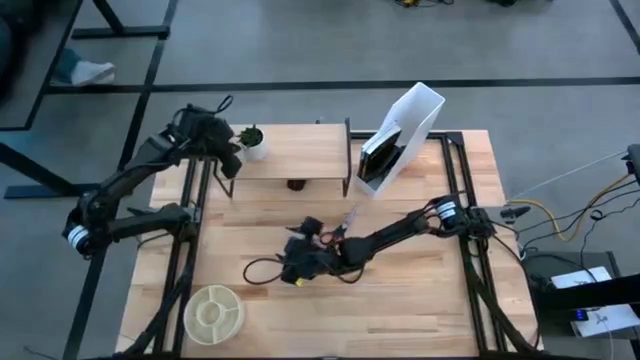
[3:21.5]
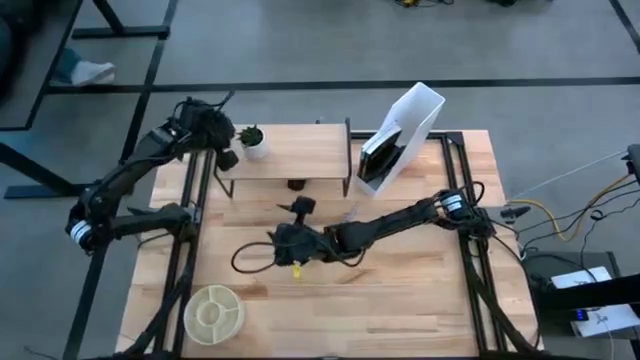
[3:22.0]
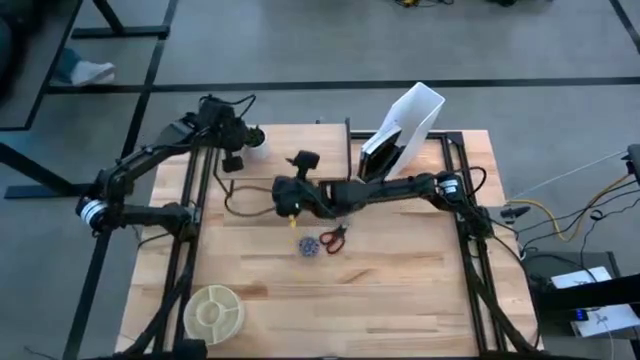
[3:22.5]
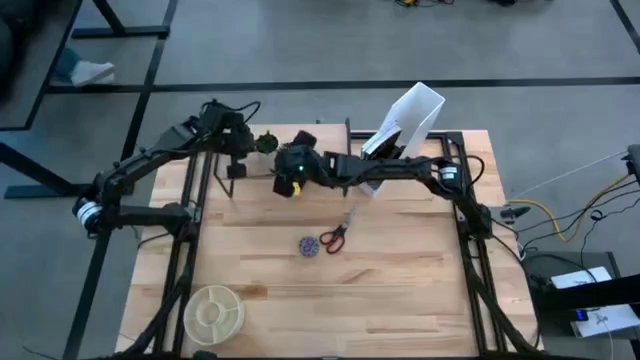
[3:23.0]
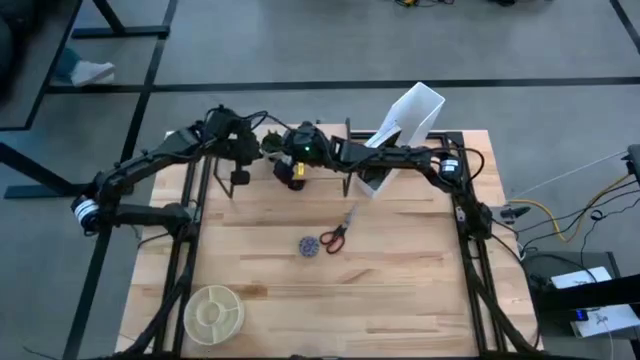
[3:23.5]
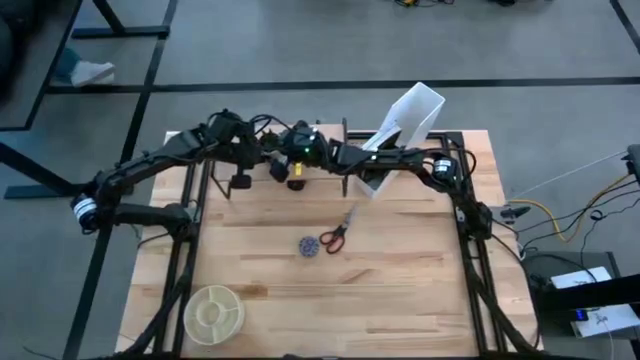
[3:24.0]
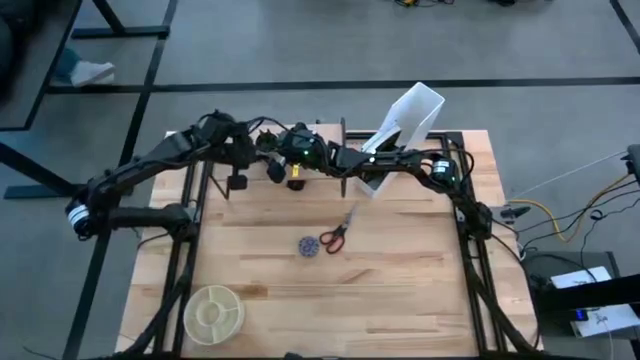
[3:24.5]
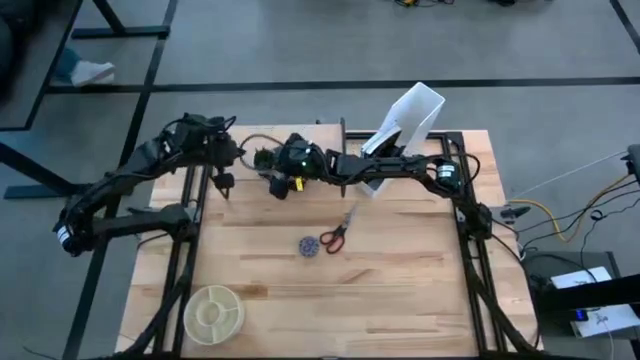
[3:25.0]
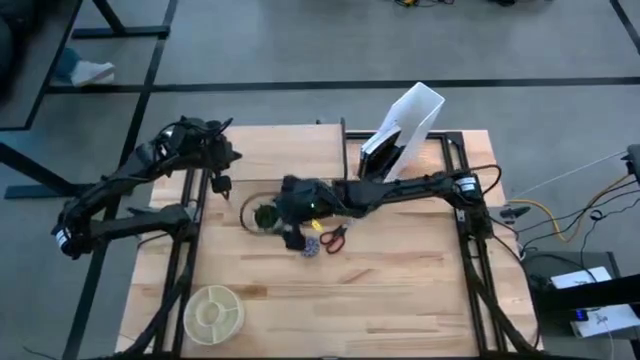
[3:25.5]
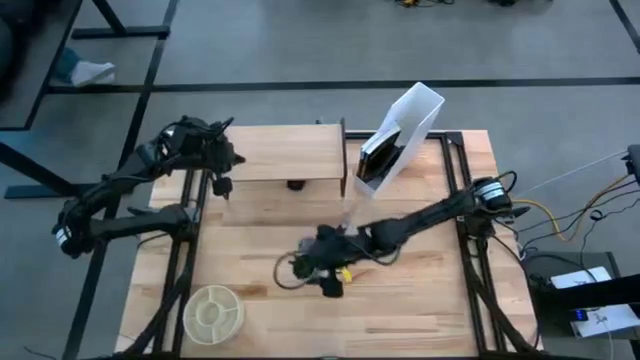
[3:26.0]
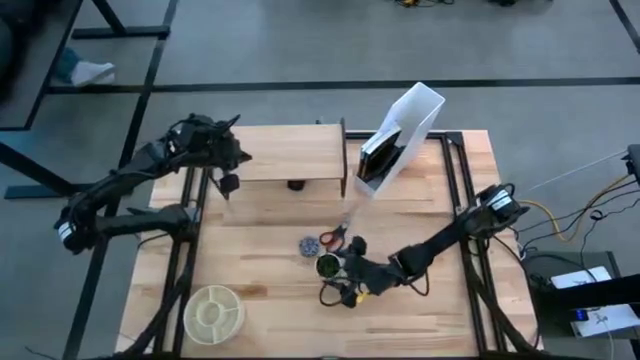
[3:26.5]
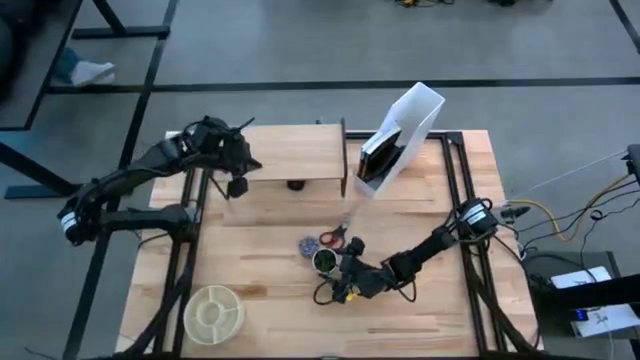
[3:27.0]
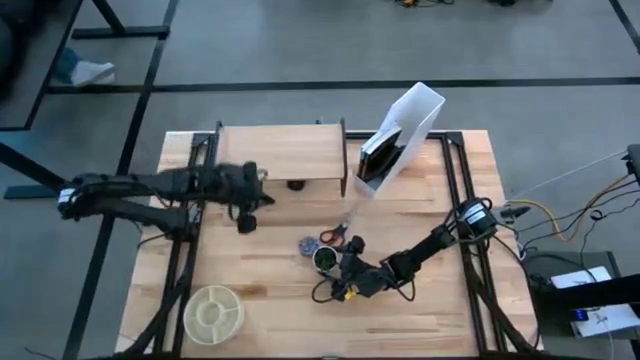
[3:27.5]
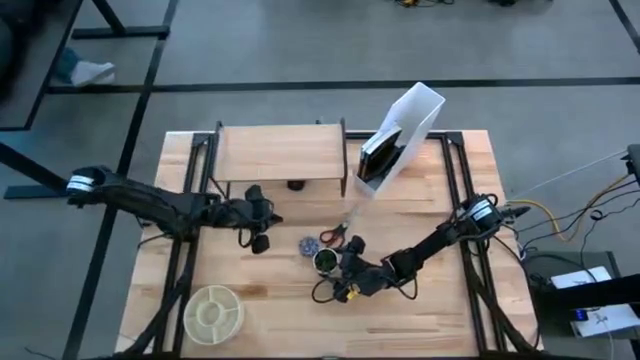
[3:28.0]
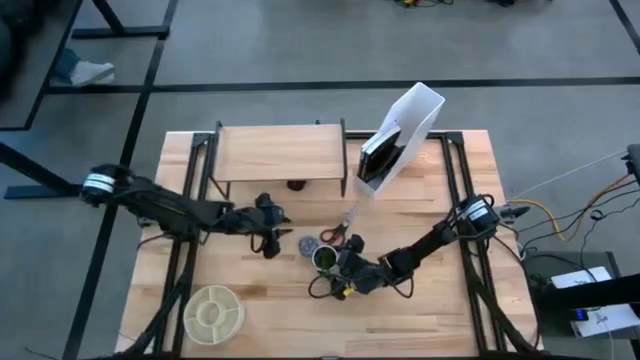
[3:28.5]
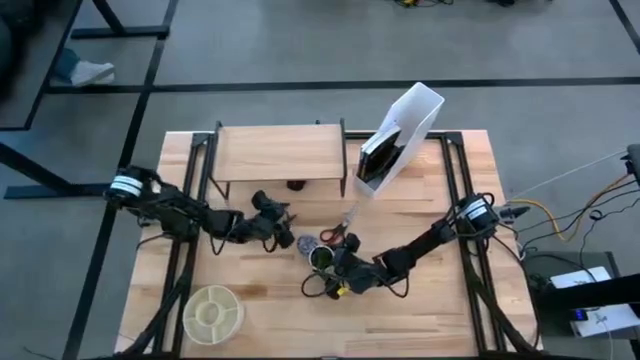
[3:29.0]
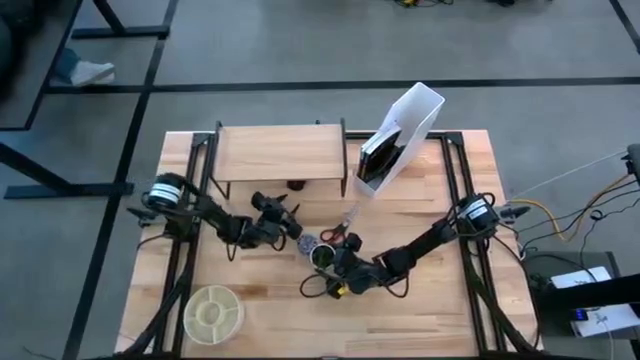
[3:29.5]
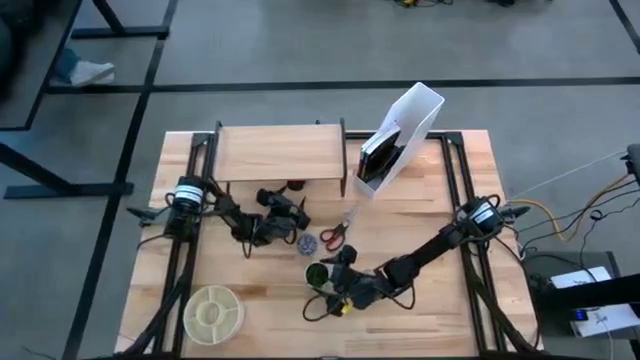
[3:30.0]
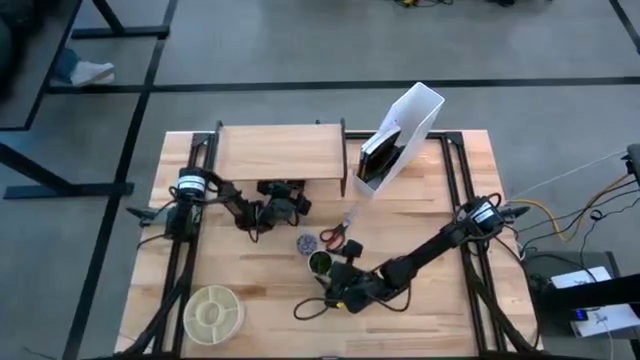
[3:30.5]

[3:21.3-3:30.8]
Task: Stock shelves
Remove the flower pot from the shelf

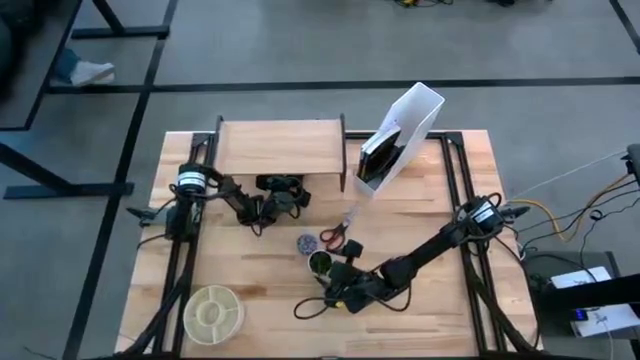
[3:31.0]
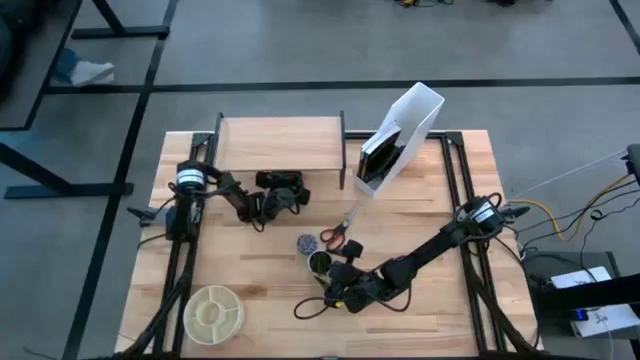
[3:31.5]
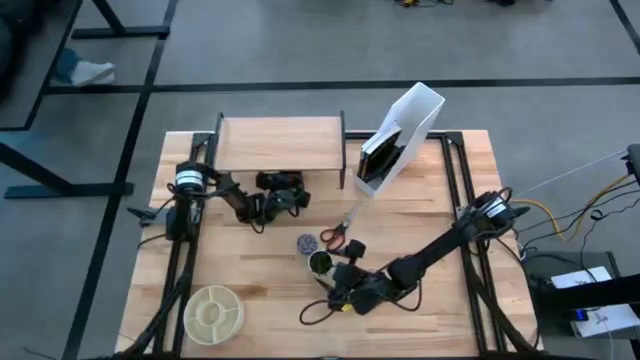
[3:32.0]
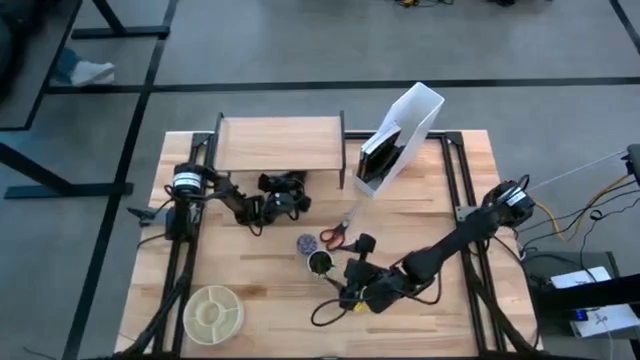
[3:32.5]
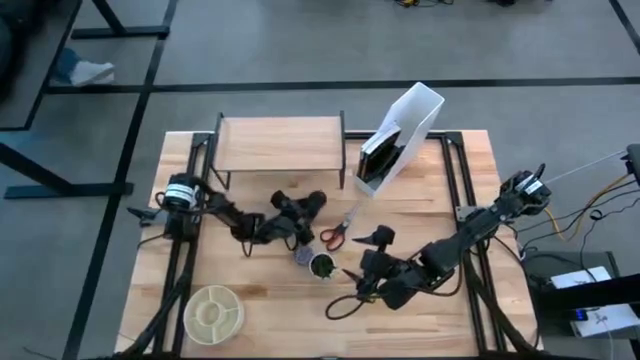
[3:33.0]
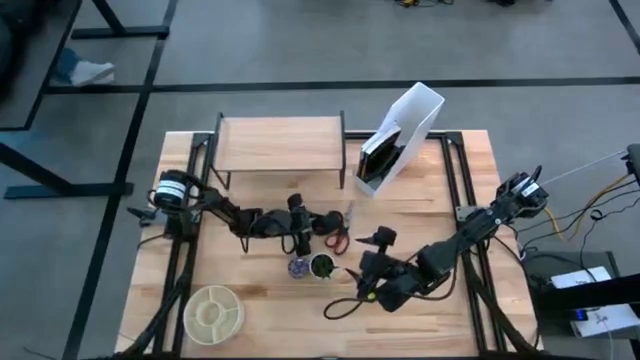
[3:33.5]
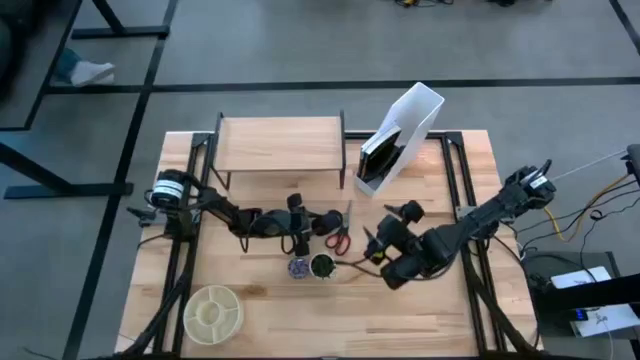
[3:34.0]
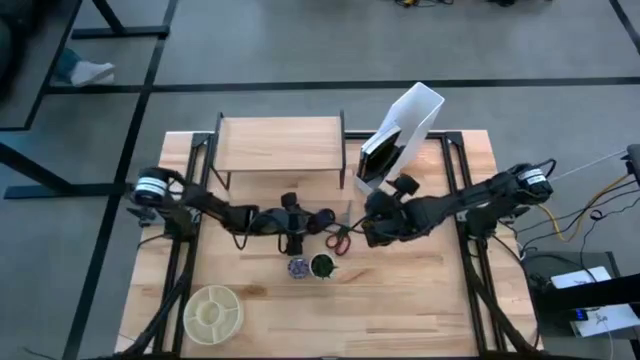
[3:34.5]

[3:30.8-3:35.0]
Remove the black mouse from under the shelf

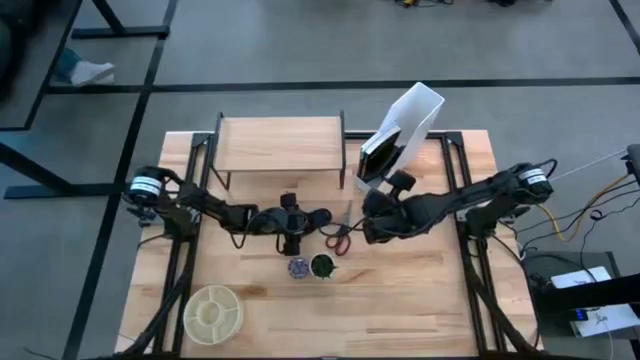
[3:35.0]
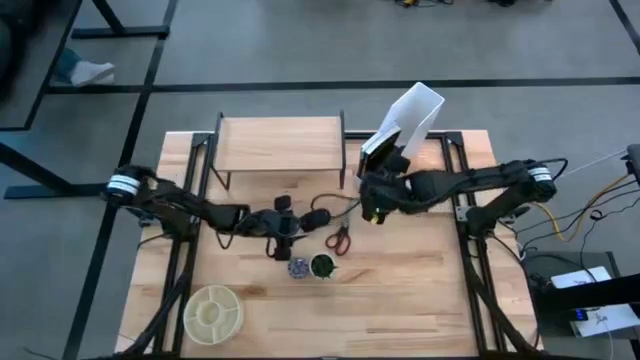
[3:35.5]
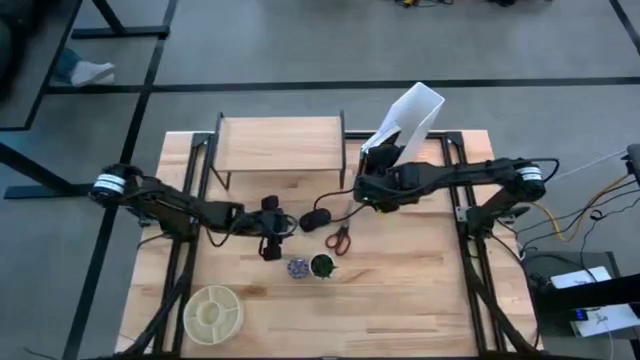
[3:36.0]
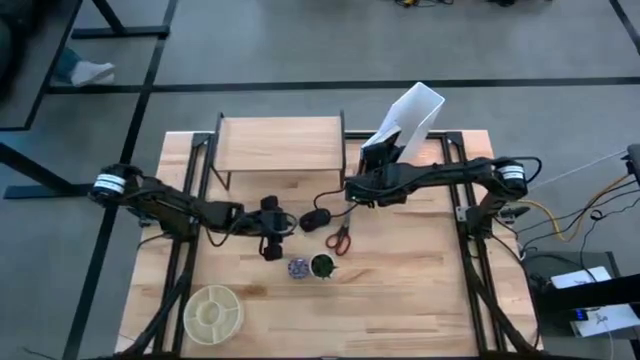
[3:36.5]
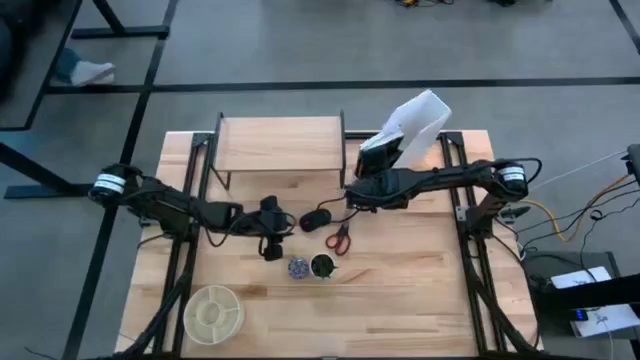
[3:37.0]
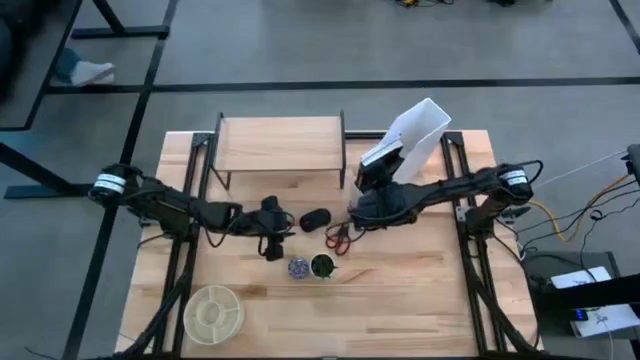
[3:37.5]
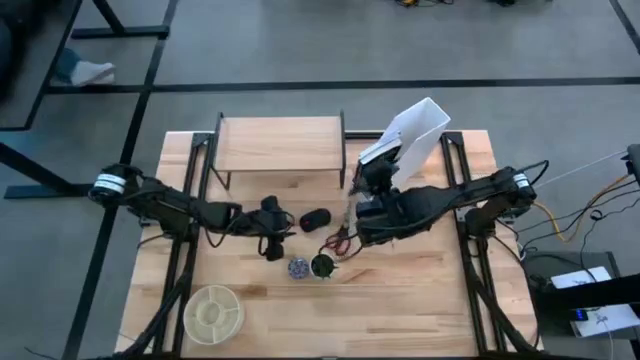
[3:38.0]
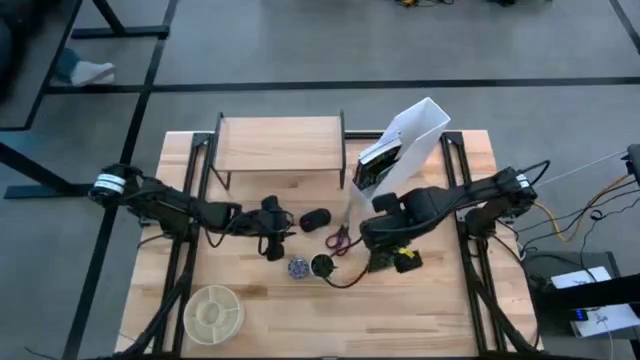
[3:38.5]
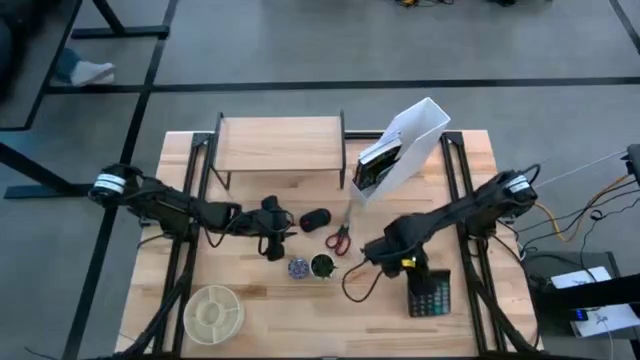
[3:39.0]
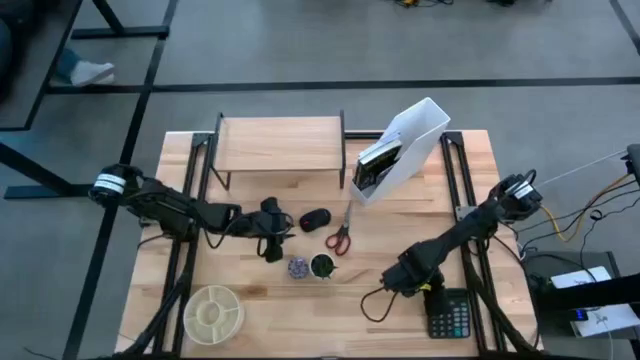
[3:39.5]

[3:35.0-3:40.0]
Remove the black calculator from the white file holder
